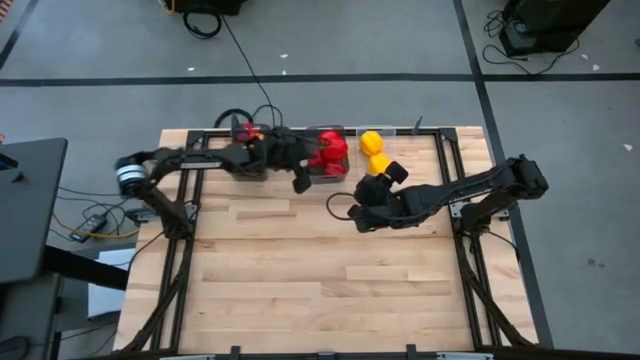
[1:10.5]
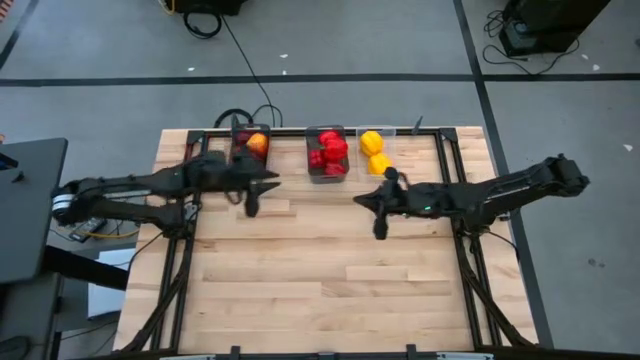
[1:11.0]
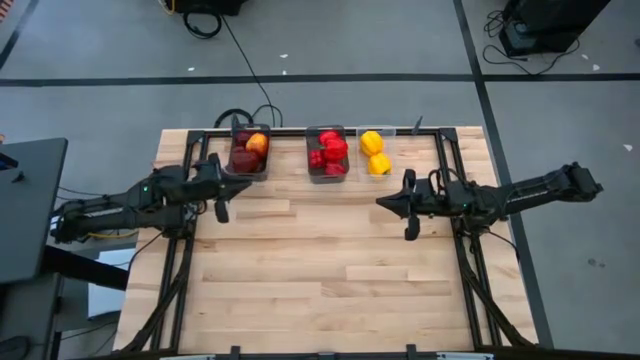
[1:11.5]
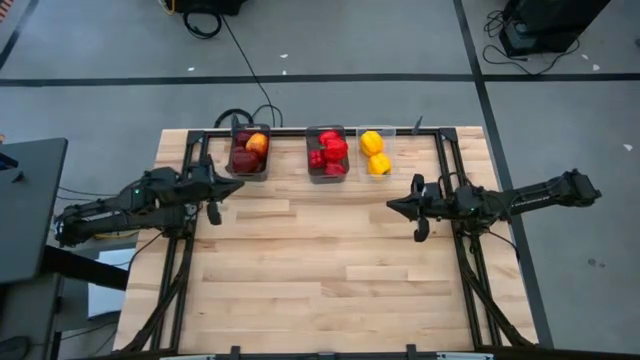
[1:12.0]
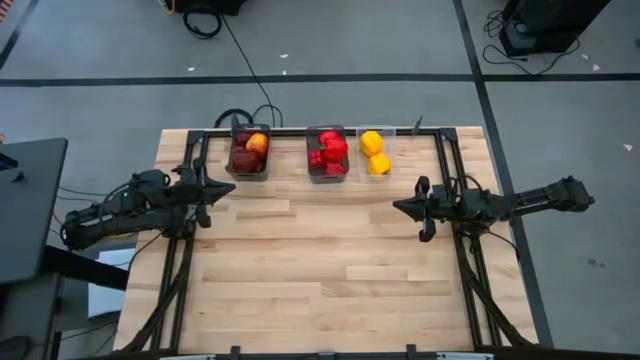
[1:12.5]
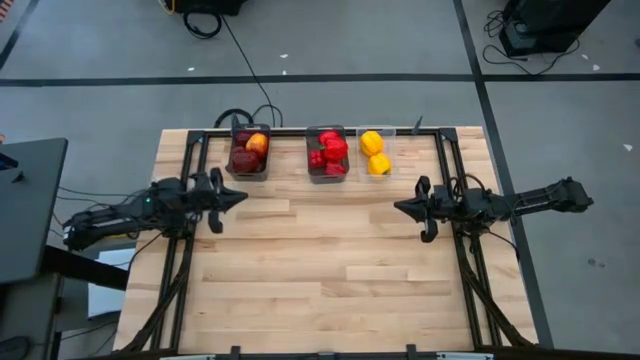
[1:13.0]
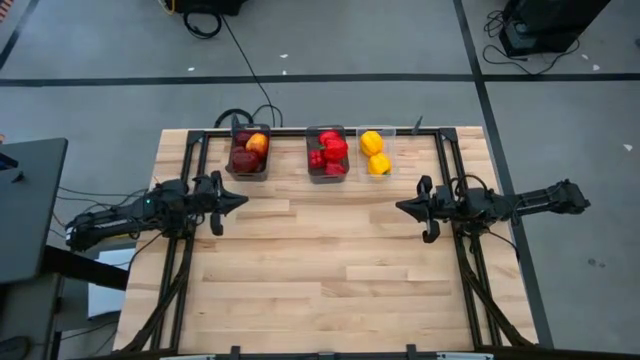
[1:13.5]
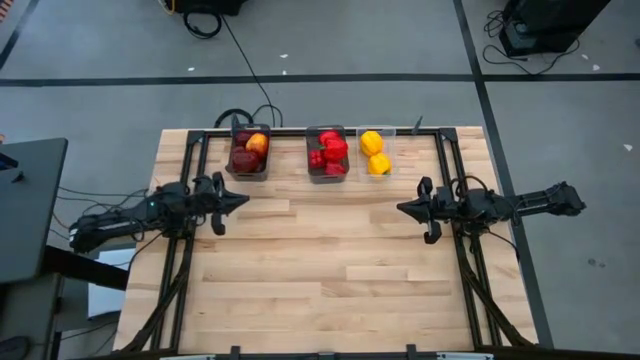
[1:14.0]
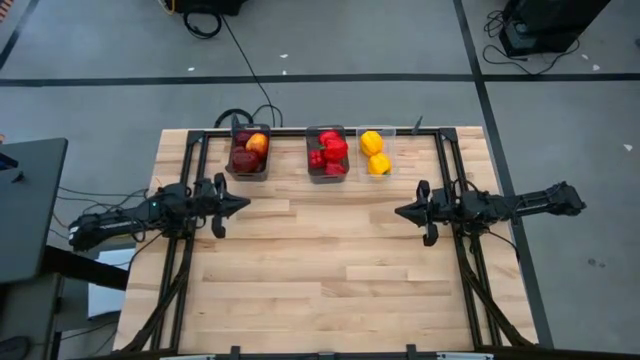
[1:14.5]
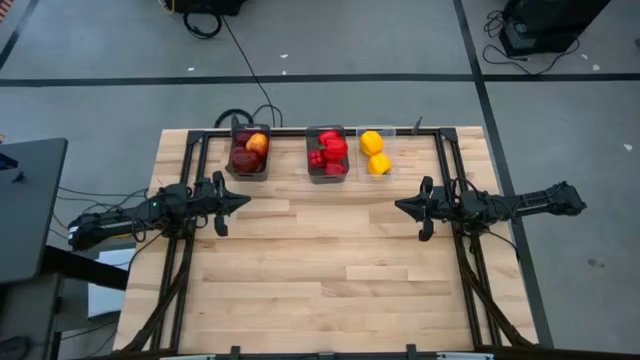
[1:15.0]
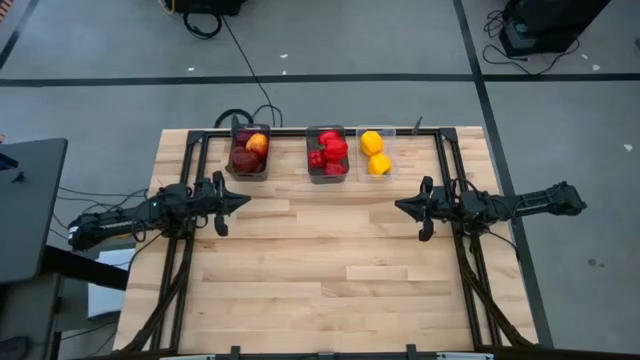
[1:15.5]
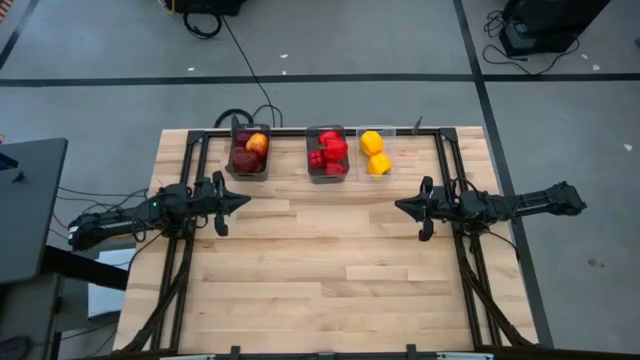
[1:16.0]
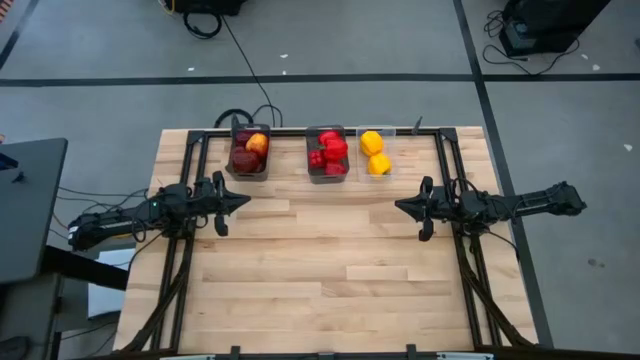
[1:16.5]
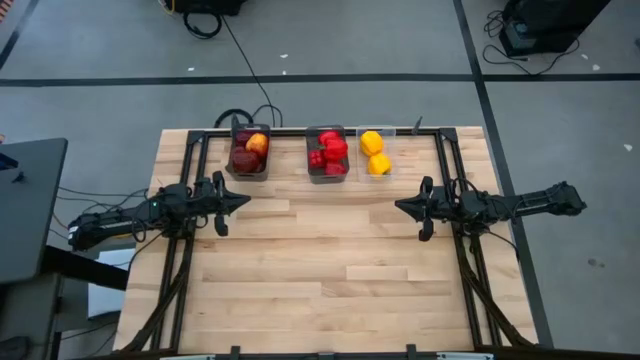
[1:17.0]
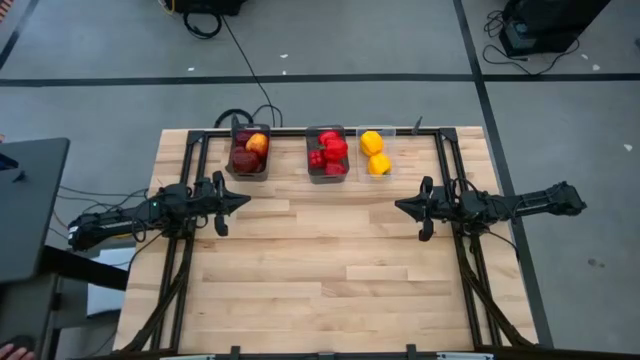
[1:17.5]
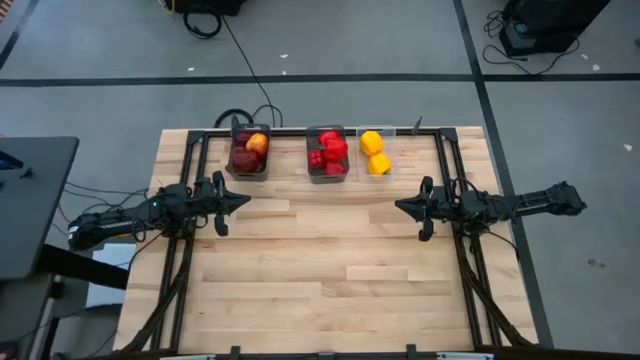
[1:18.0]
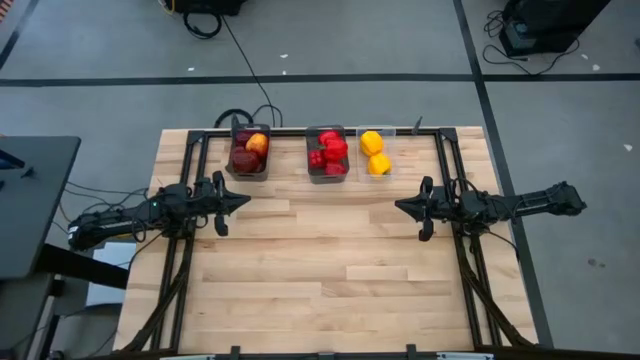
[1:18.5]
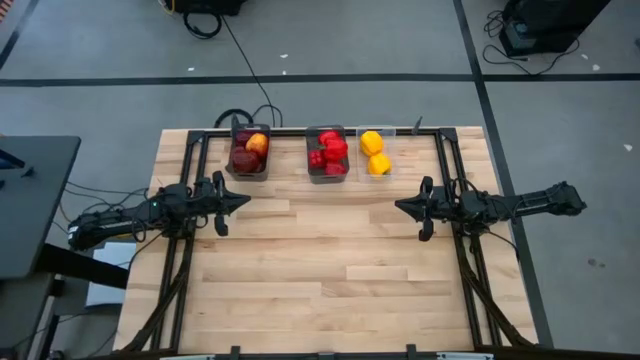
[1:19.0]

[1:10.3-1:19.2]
Task: Sort produce into baskets
Return to Home Position

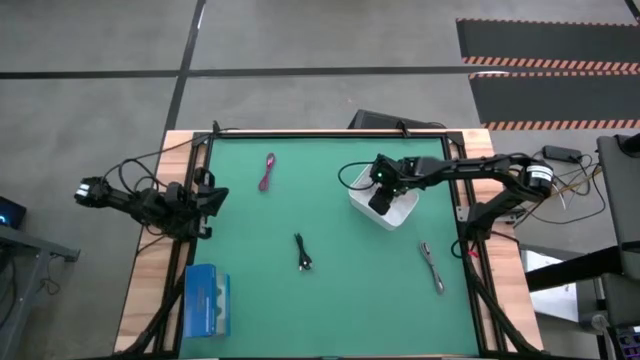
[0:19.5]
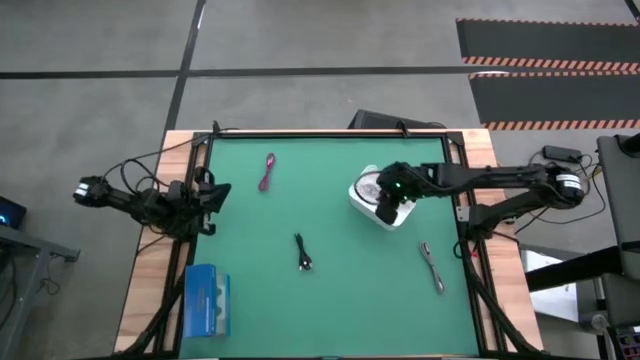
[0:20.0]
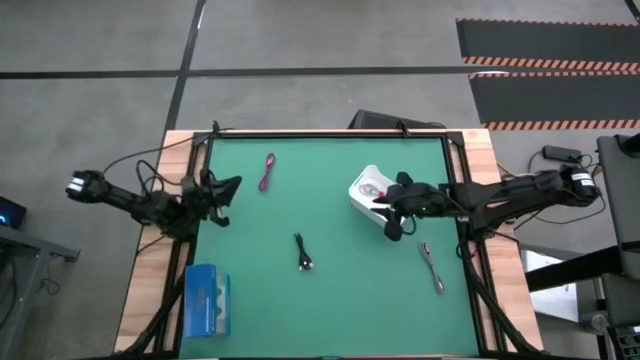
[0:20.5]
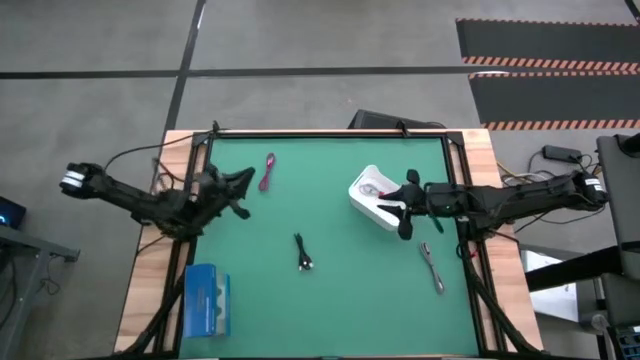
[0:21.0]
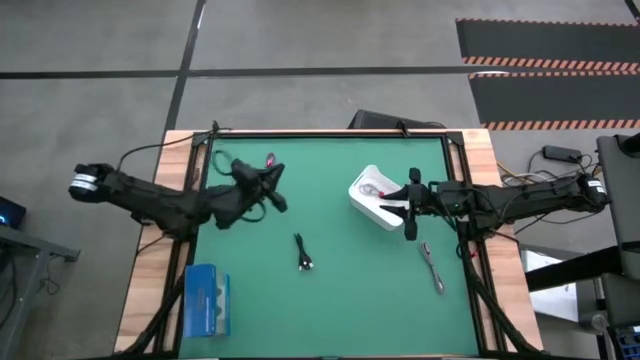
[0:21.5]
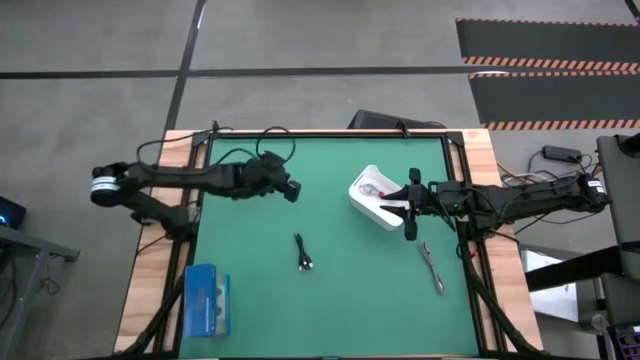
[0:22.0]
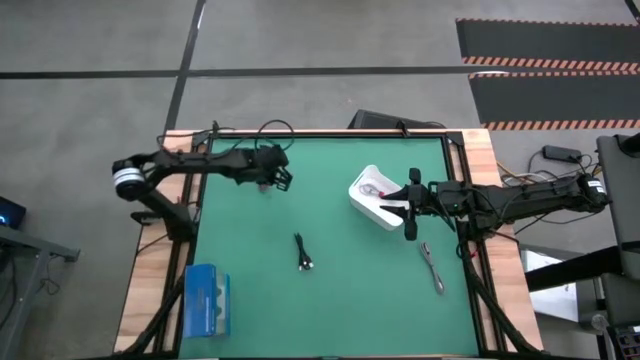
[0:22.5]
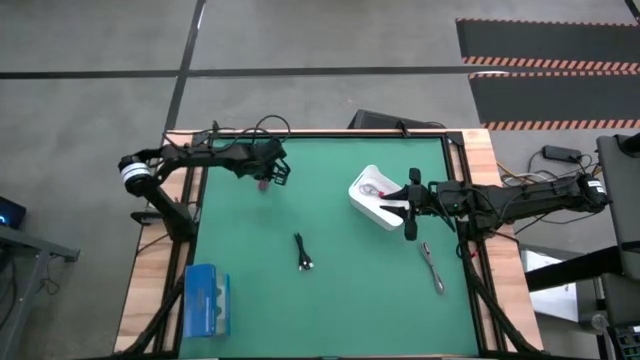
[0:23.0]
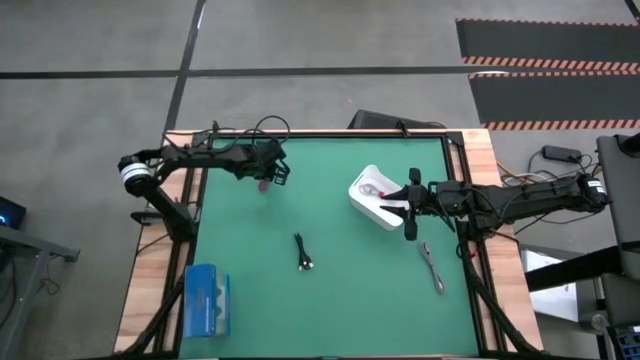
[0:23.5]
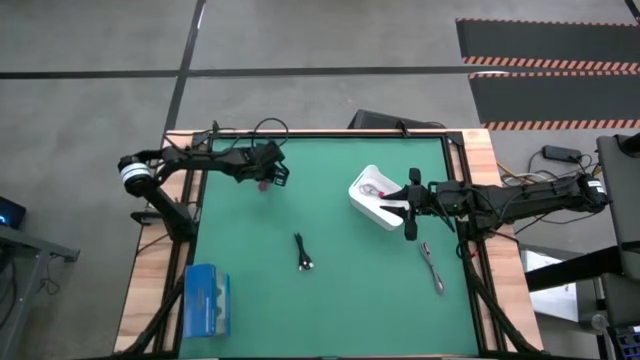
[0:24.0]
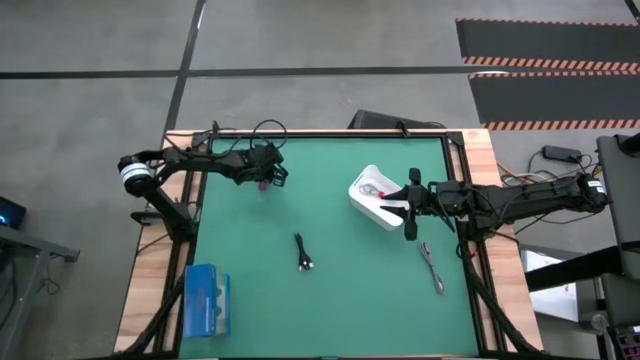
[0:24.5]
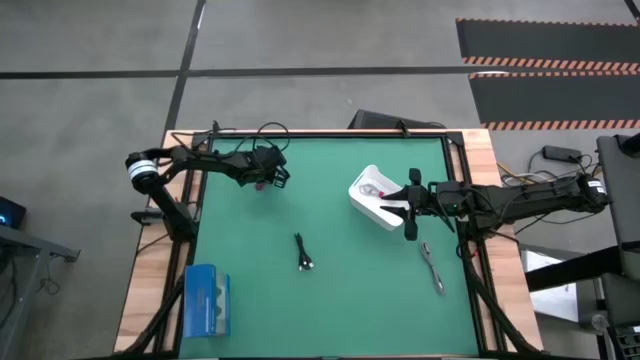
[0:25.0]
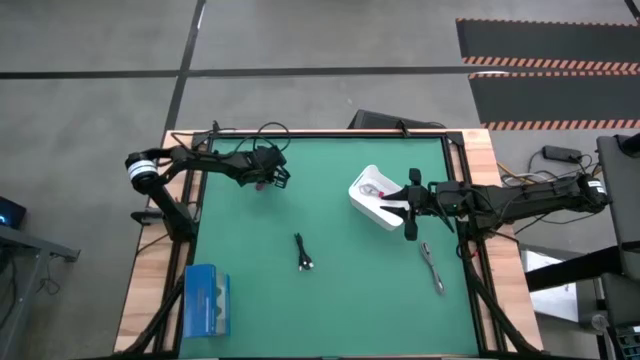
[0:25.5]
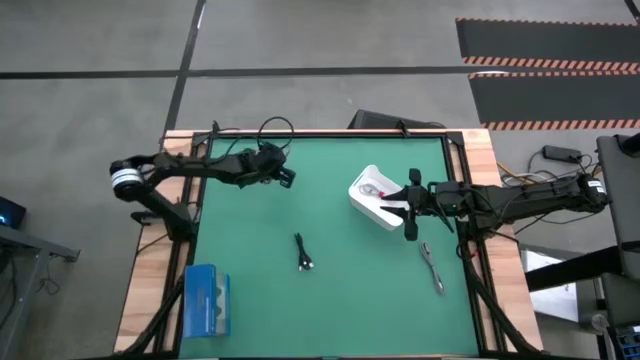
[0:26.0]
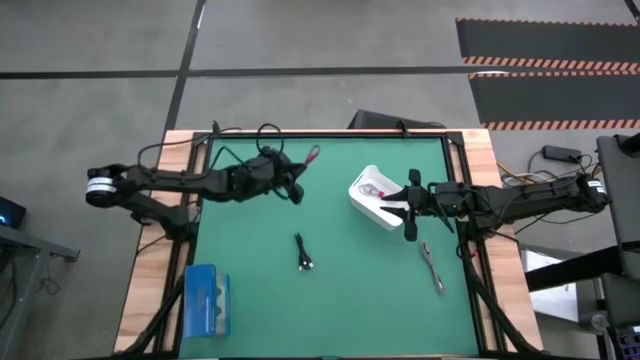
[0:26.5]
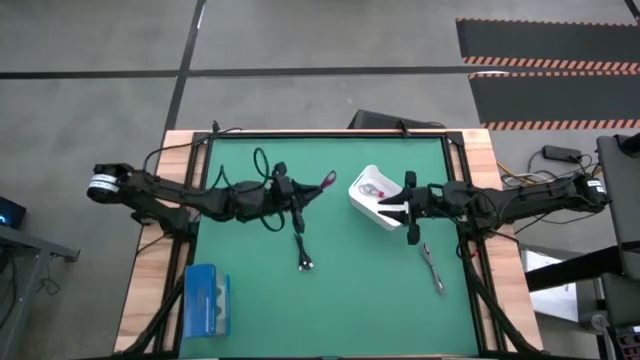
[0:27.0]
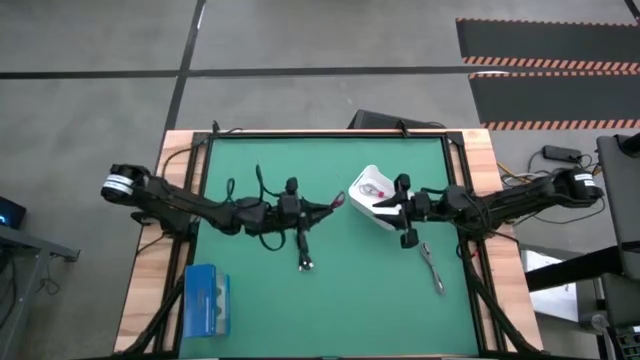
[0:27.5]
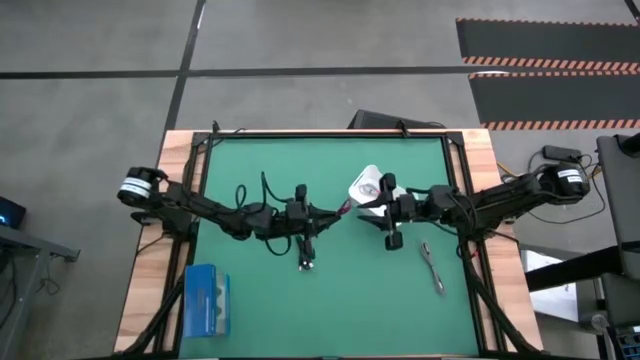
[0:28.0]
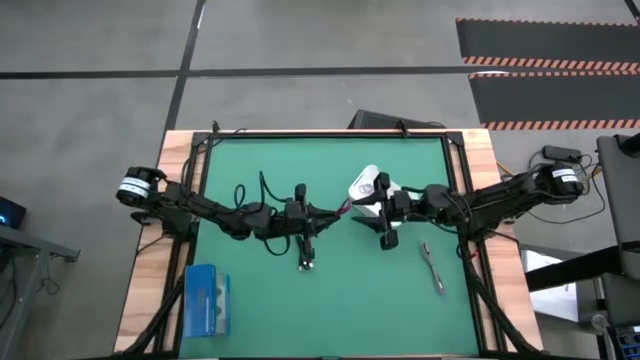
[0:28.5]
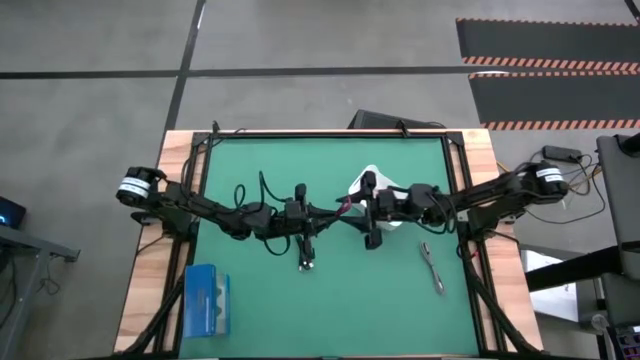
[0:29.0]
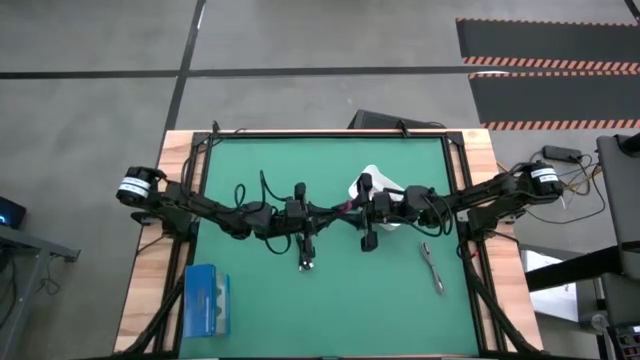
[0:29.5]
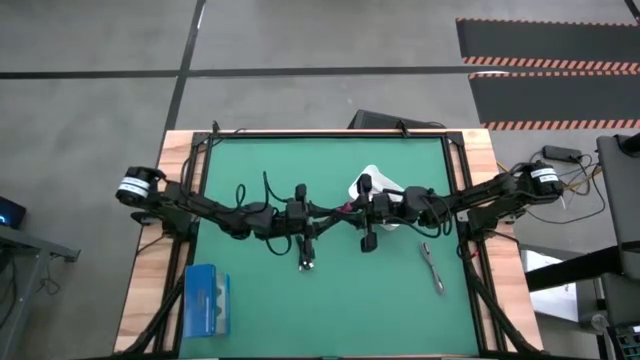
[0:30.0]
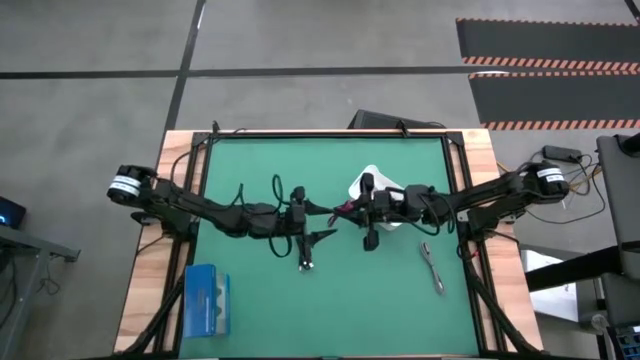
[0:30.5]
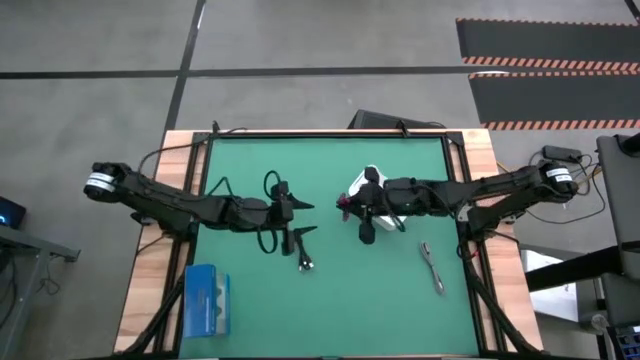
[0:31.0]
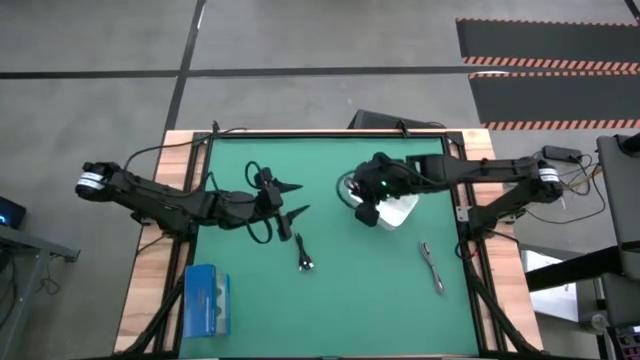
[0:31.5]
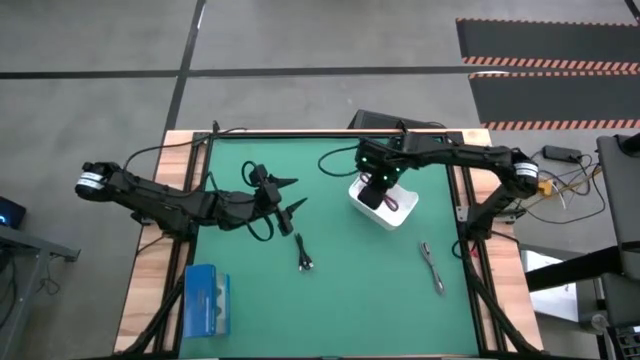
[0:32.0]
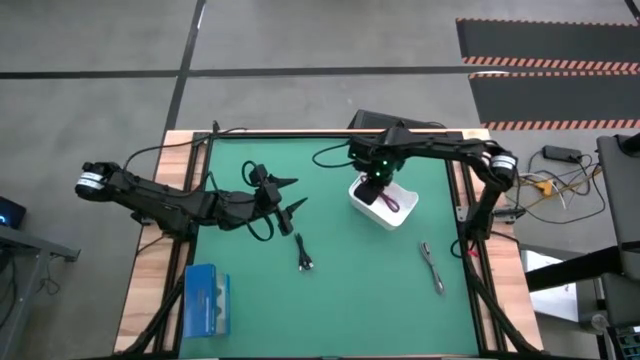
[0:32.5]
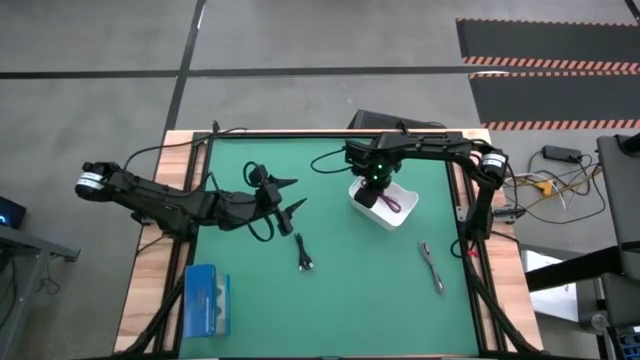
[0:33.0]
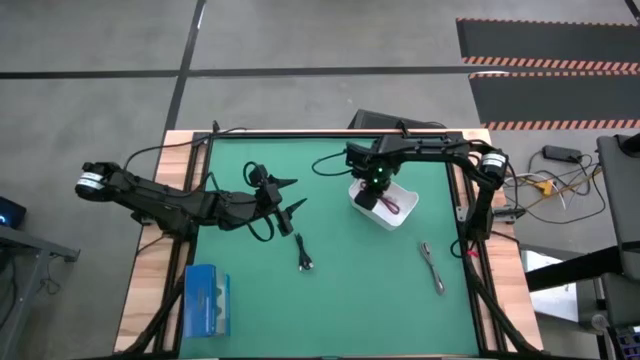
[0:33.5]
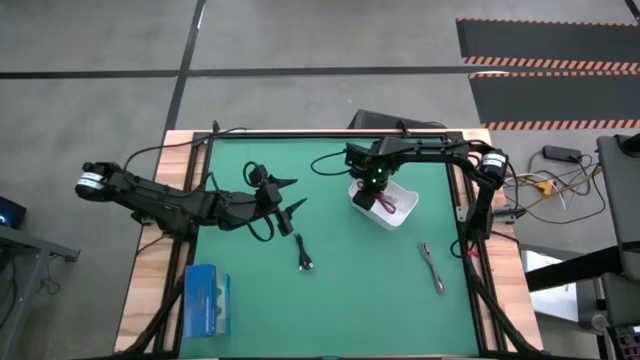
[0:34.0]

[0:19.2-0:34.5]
Task: Pick and place USB-C Cables
Put the black red charger cable into the white bin
